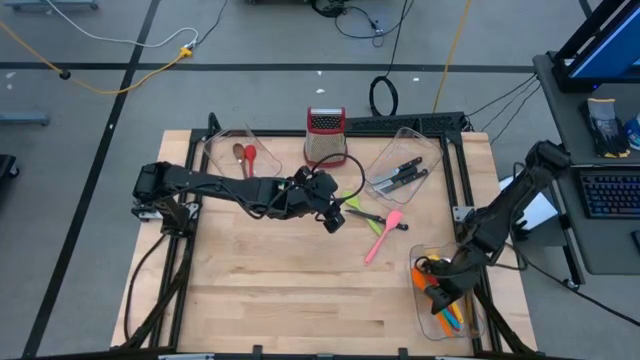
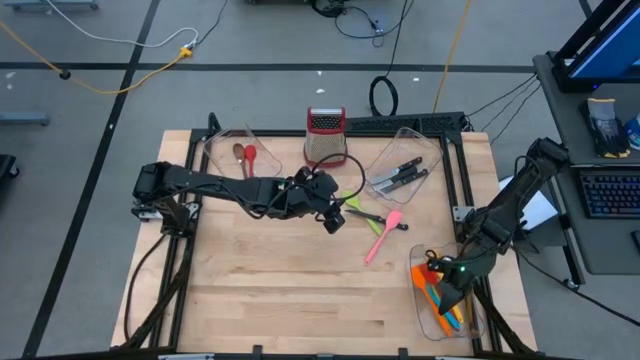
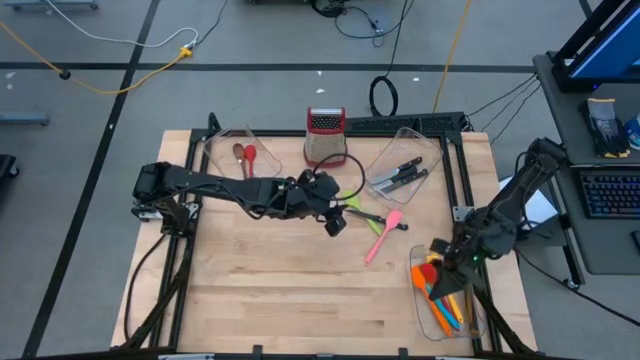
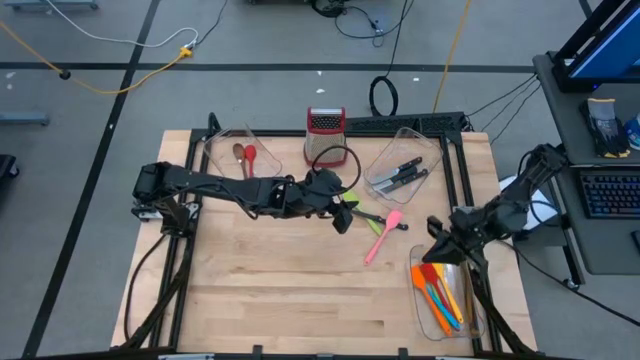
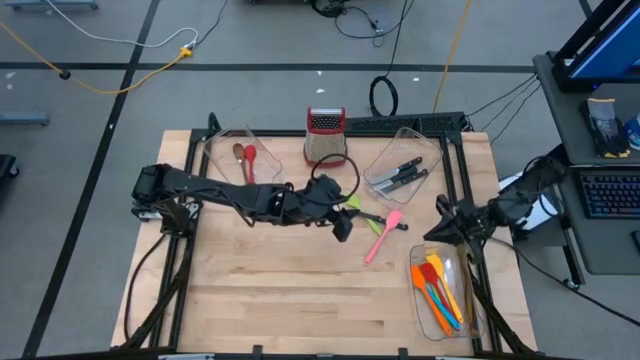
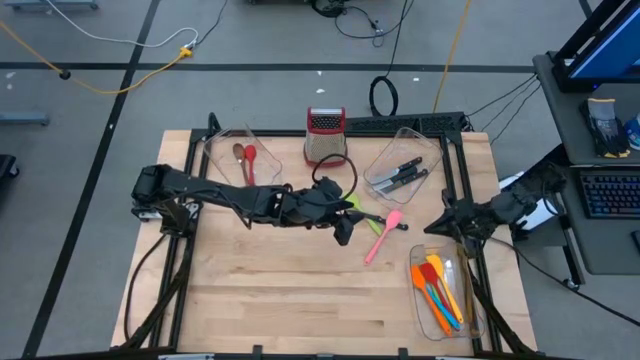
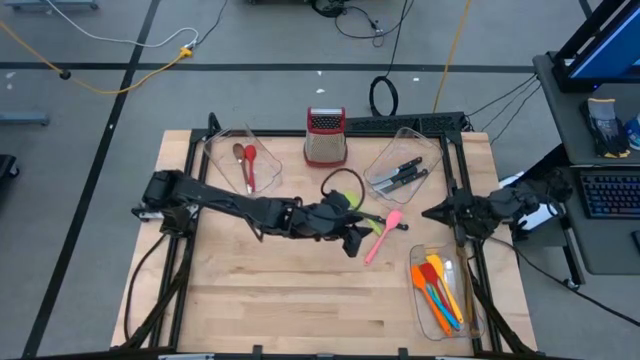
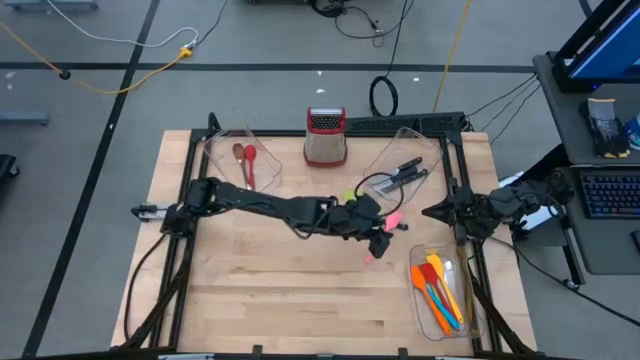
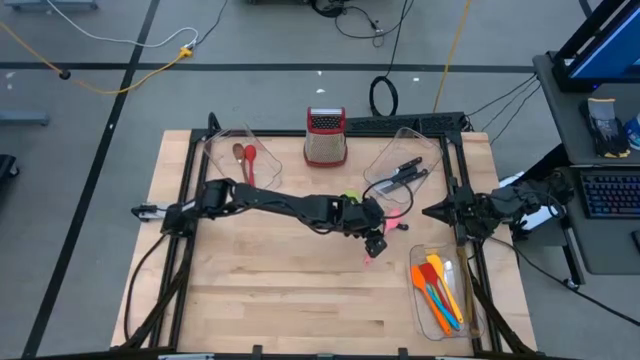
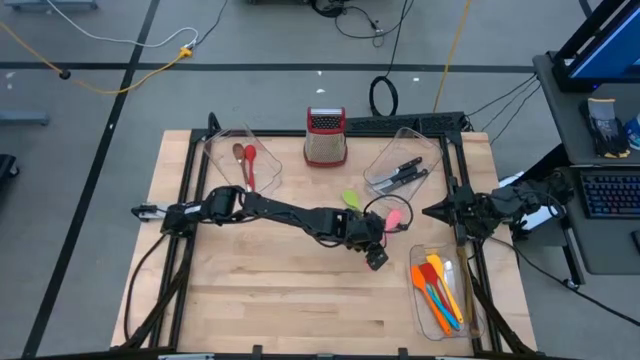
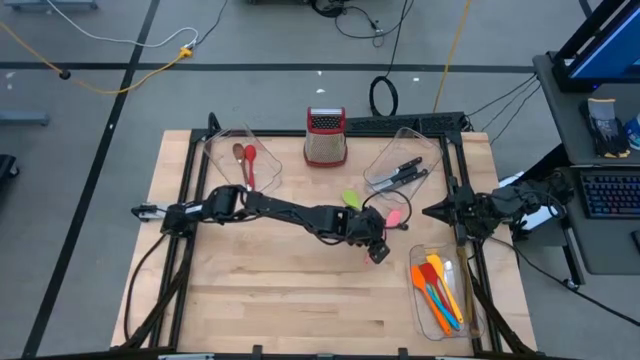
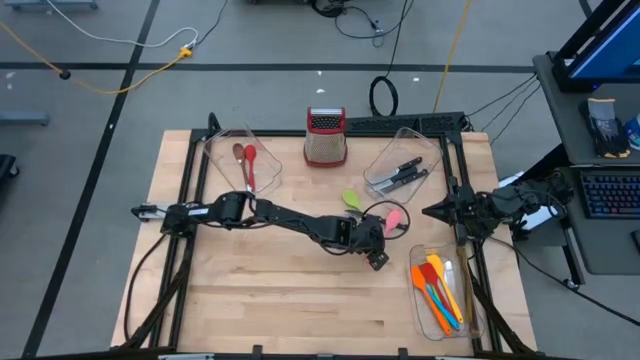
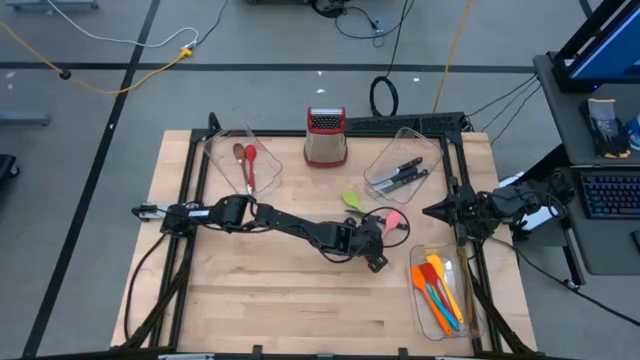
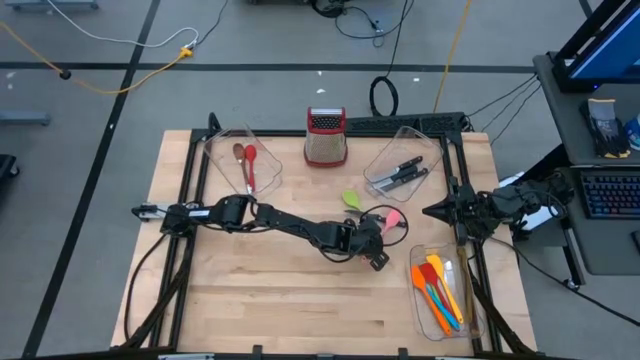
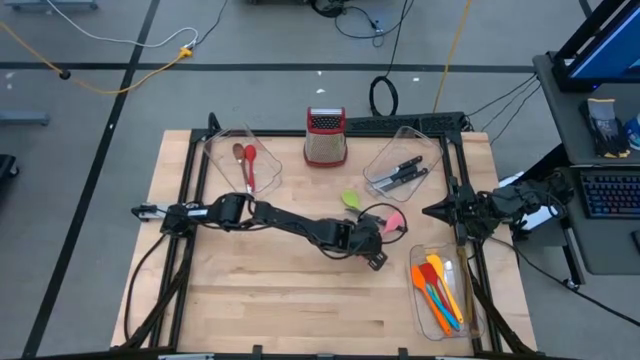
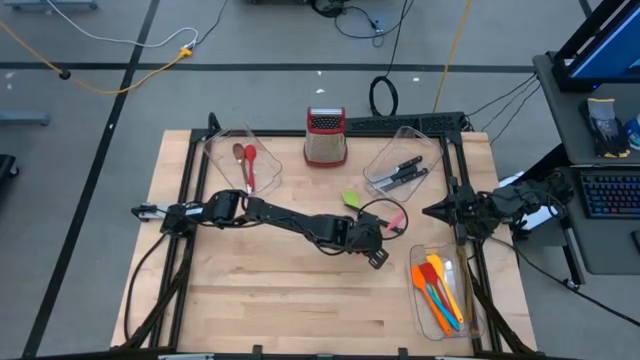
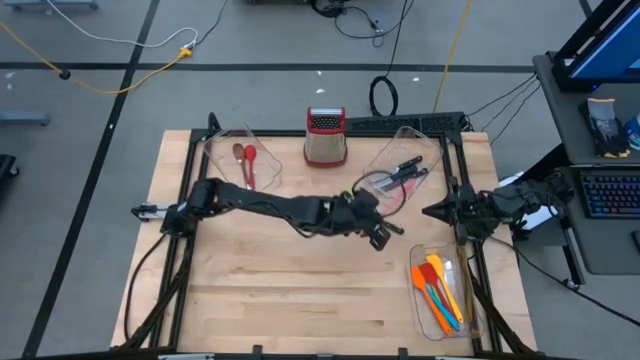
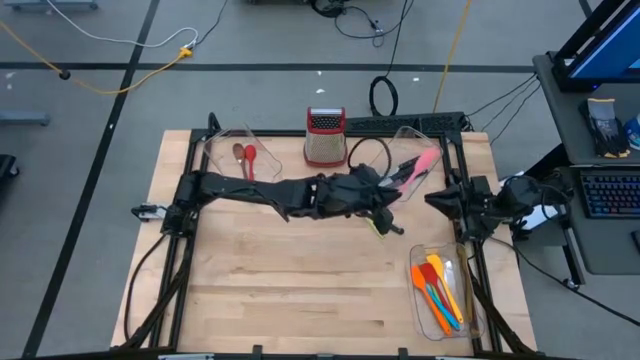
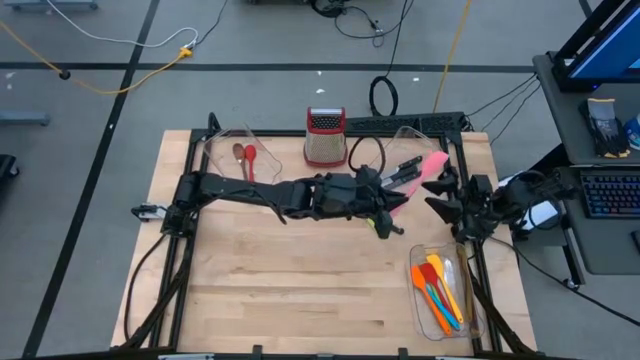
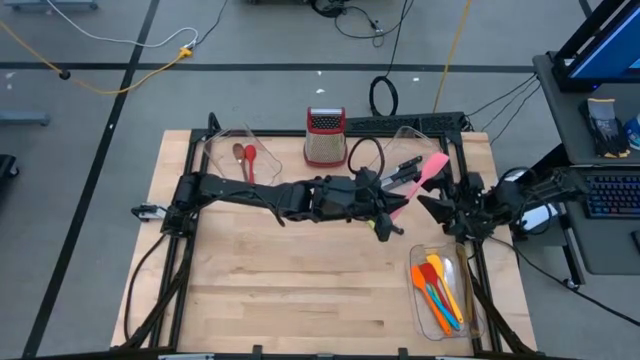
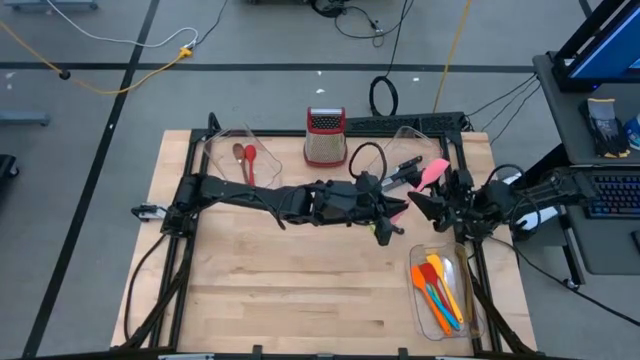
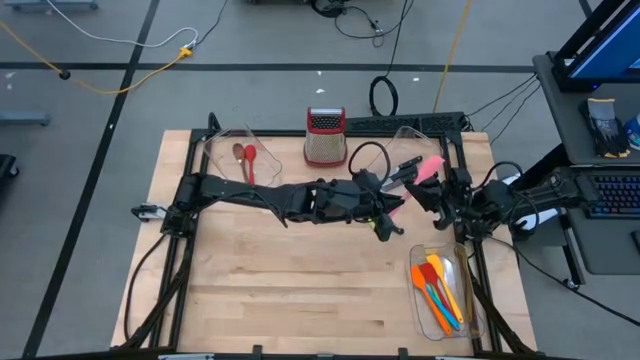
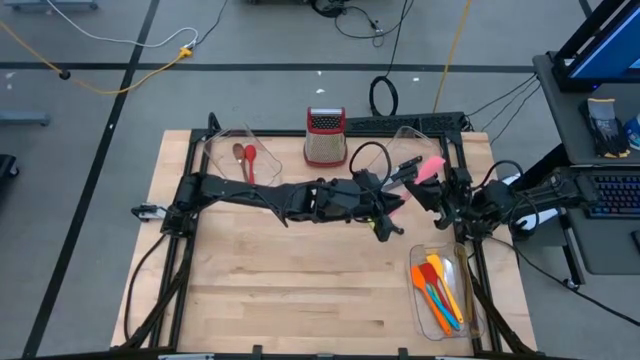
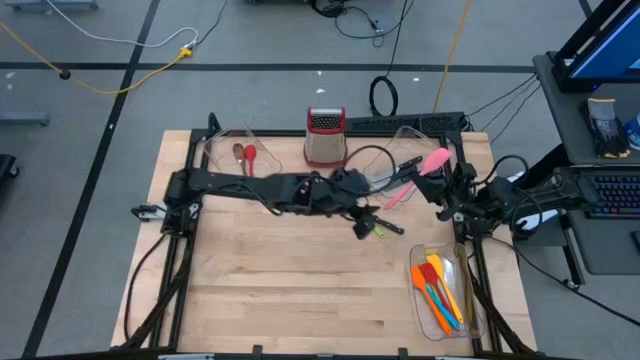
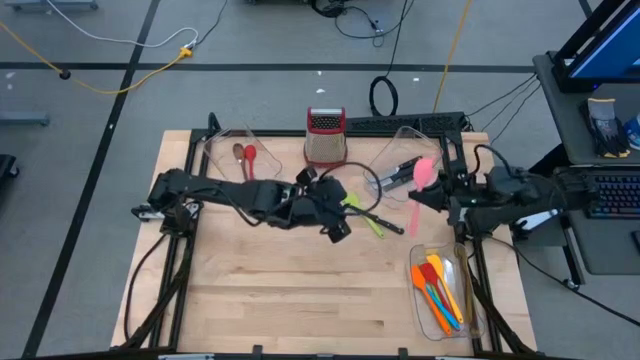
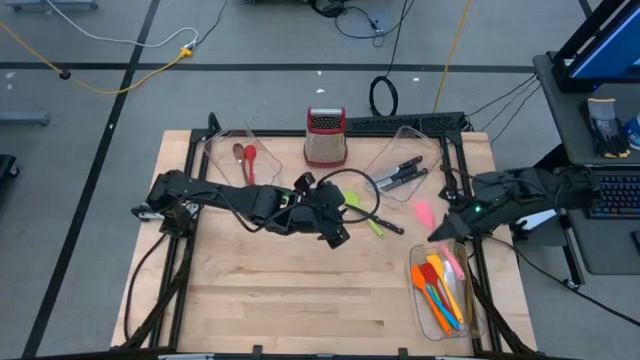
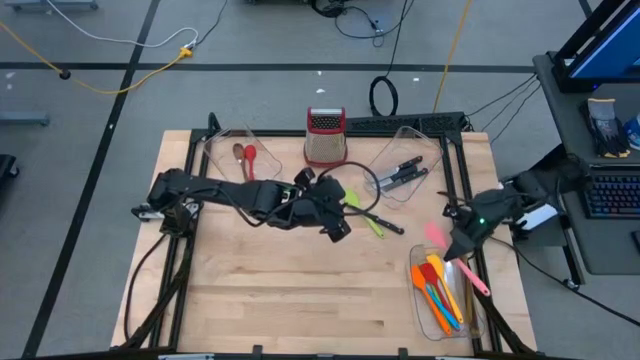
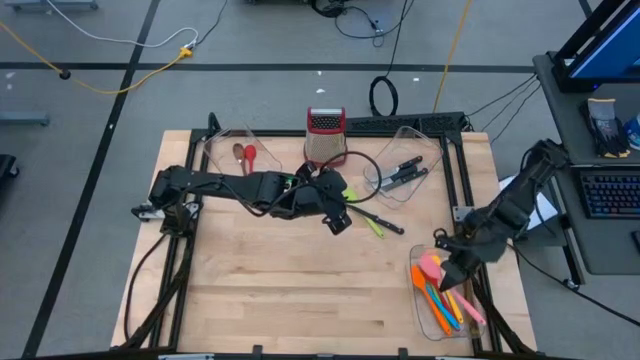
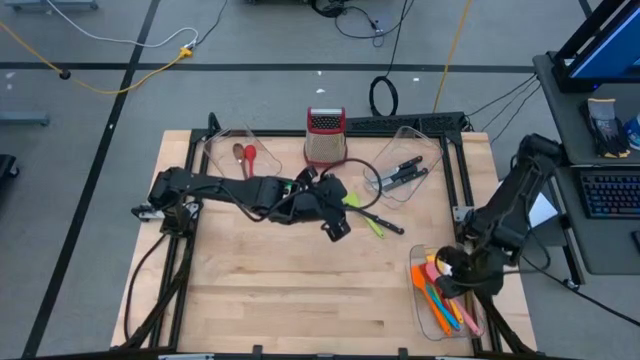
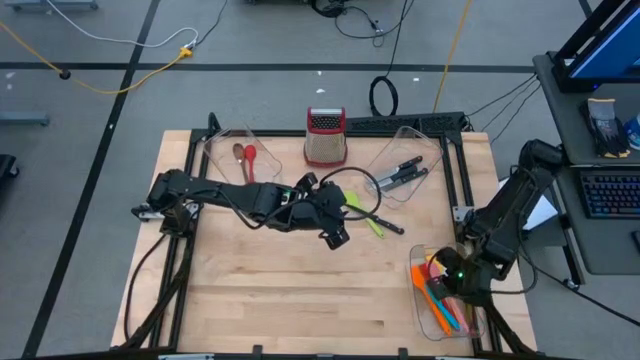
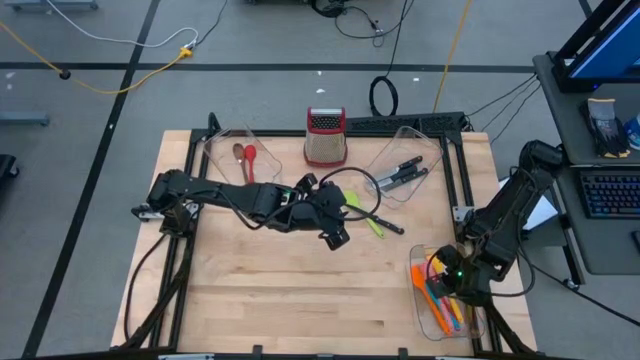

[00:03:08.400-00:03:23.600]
Task: Pick & Place Kitchen Items
Put the pink spatula into the bottom transparent bin

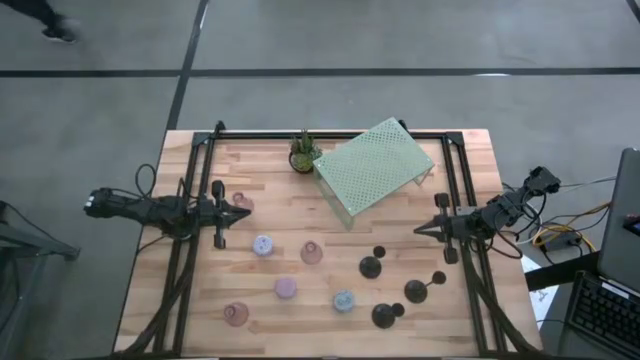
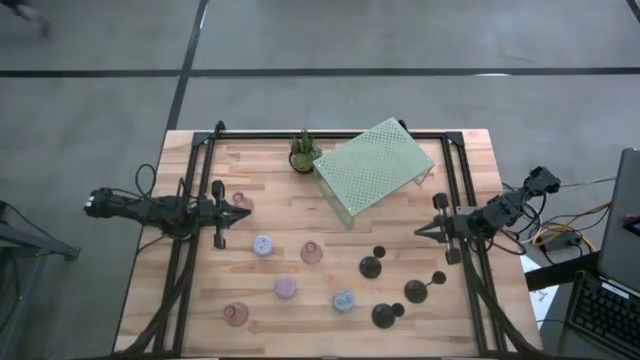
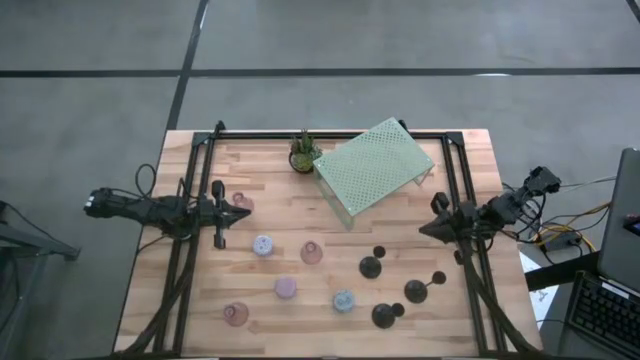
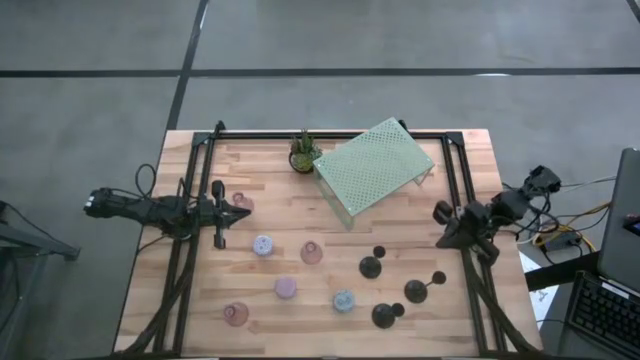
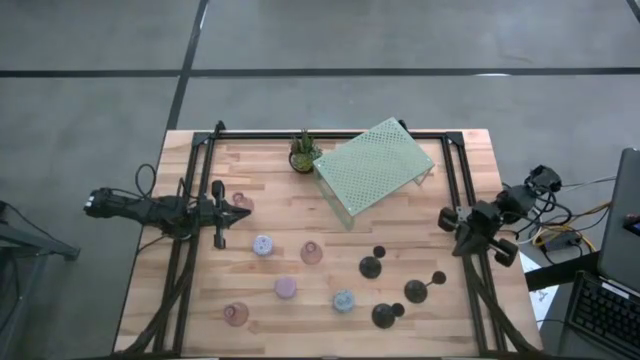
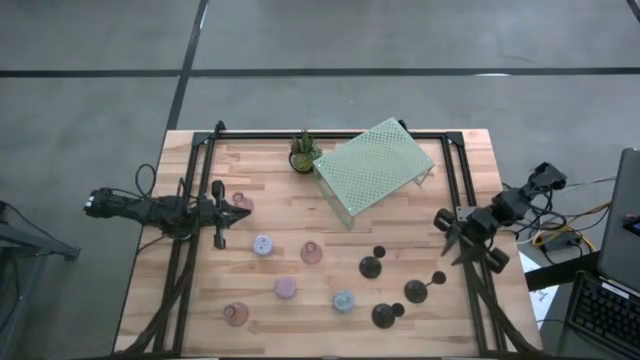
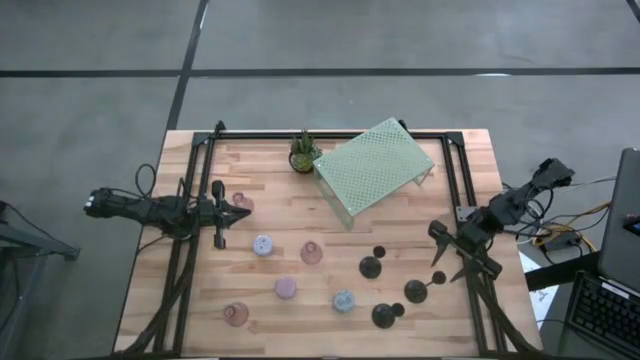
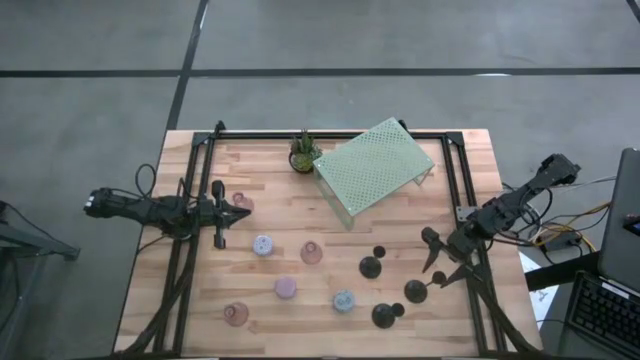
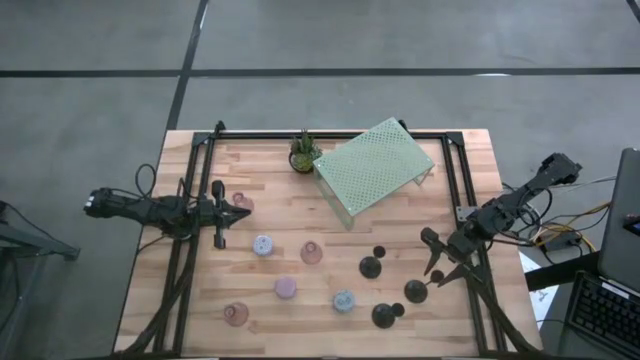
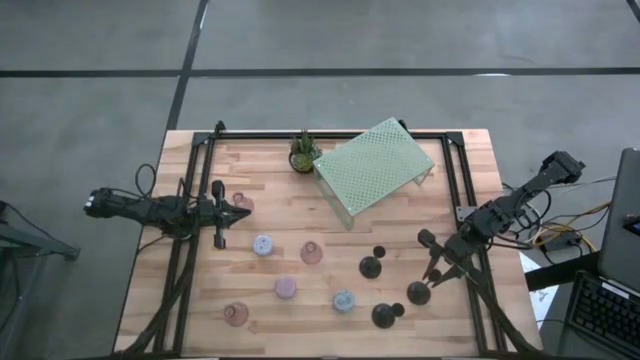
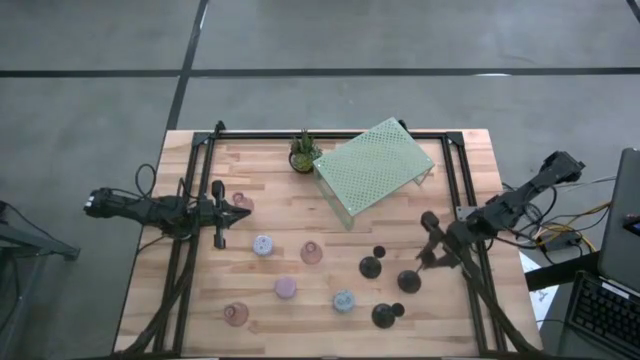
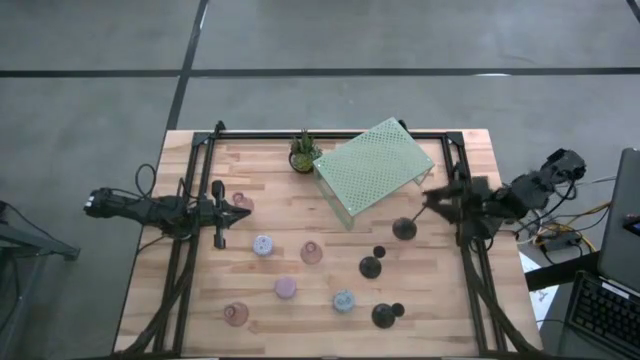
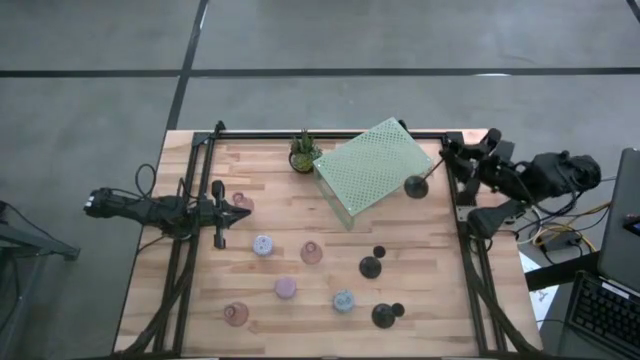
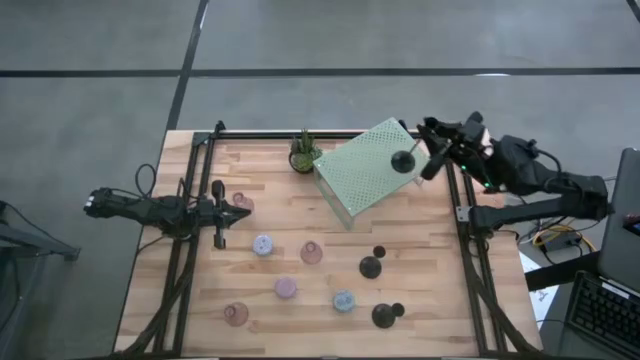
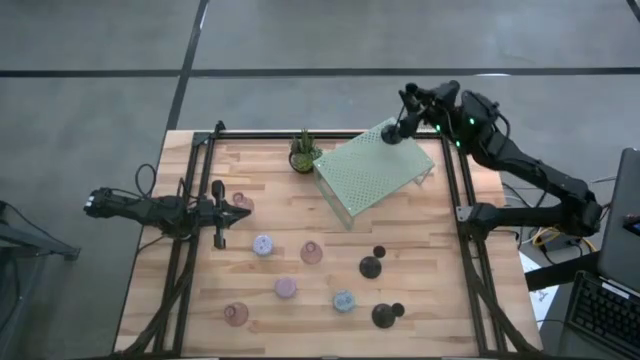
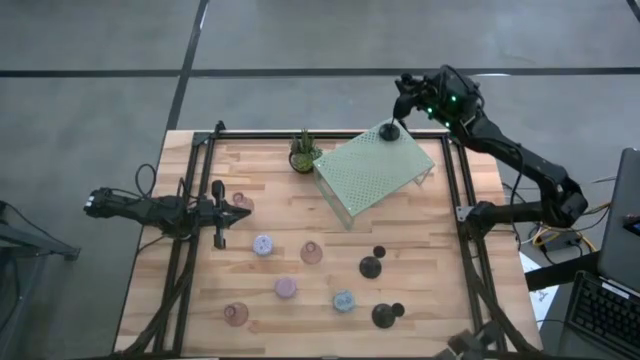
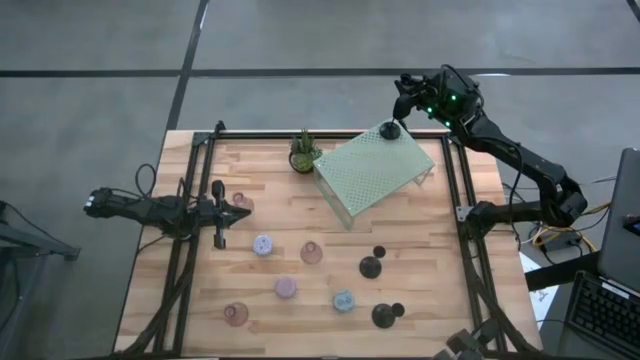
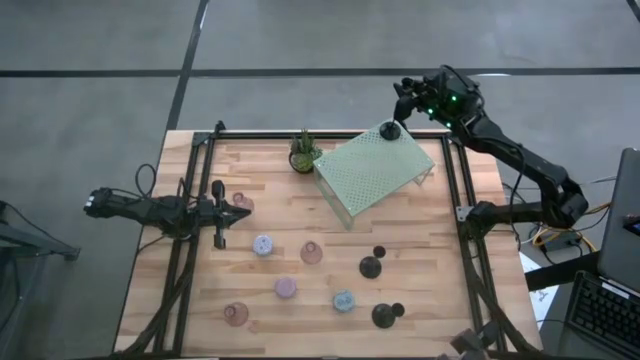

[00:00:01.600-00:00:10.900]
Task: Pick & Place candle stick holders
Put the right black candle holder on the shelf
